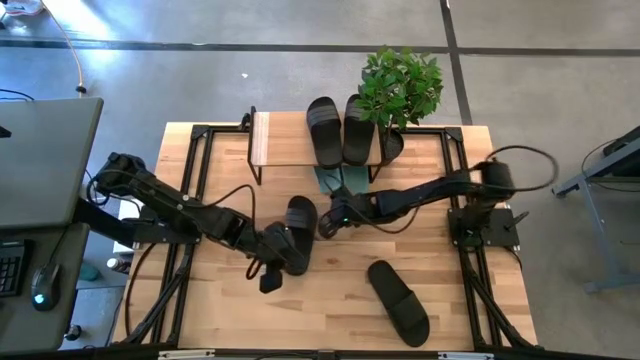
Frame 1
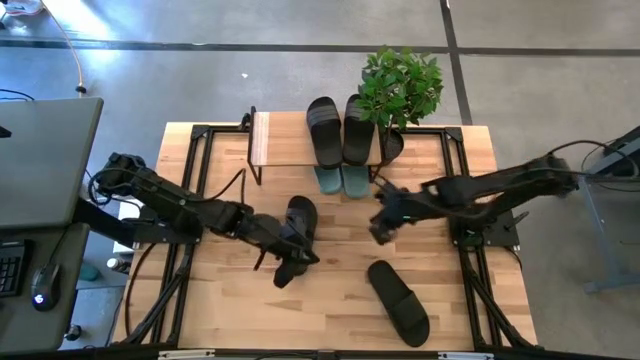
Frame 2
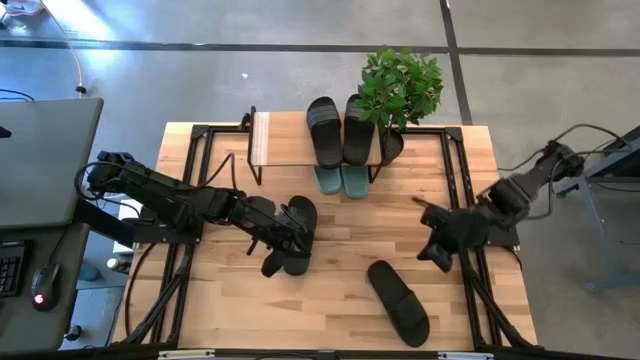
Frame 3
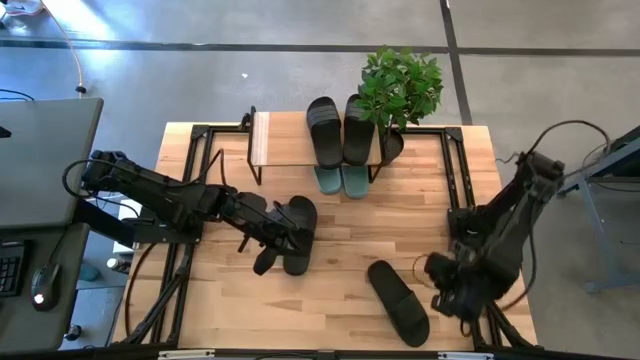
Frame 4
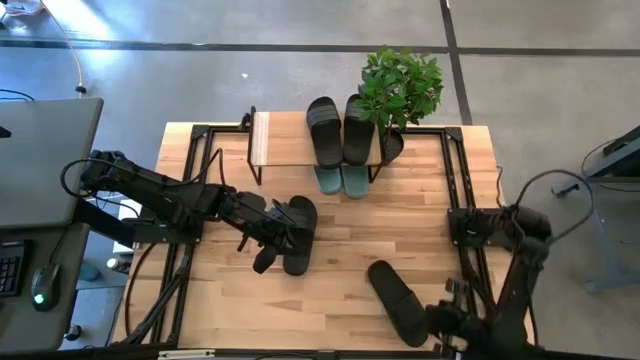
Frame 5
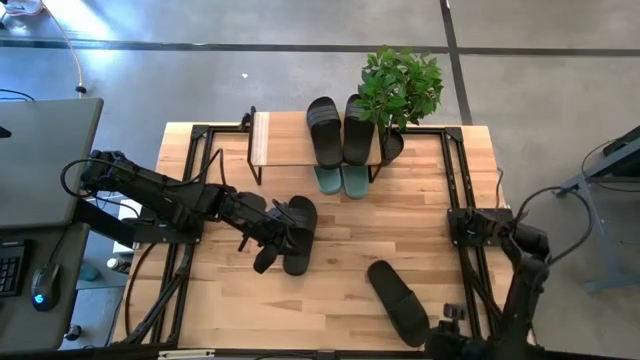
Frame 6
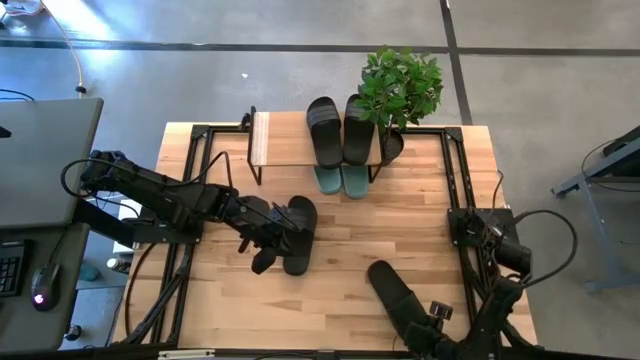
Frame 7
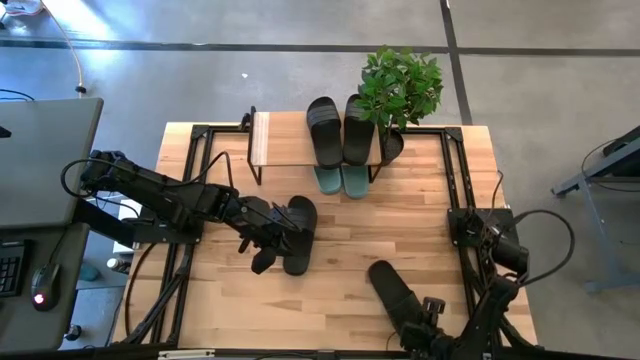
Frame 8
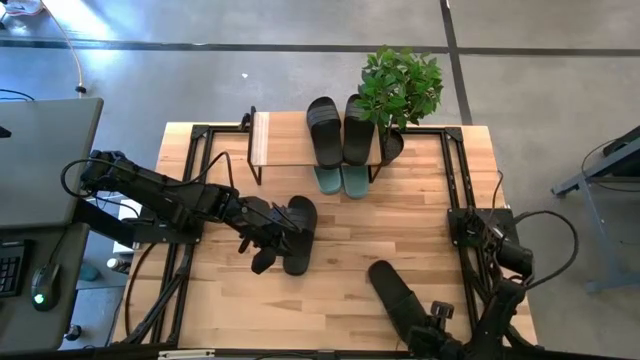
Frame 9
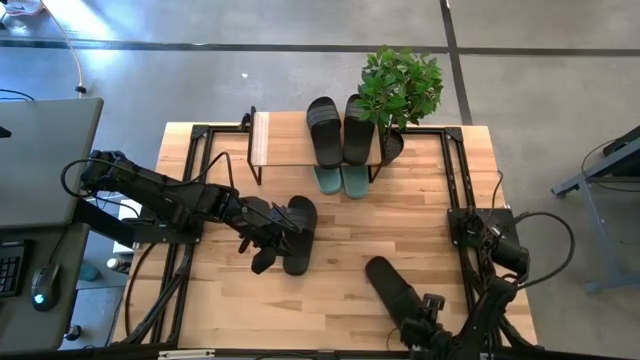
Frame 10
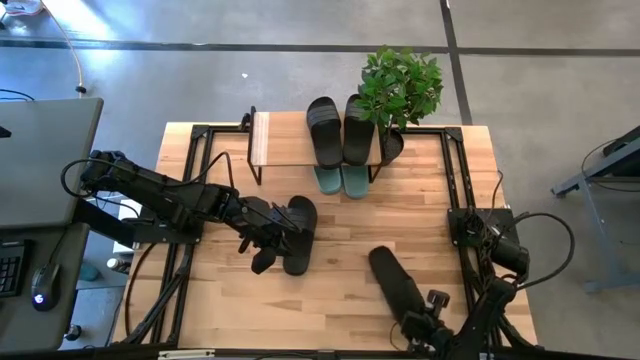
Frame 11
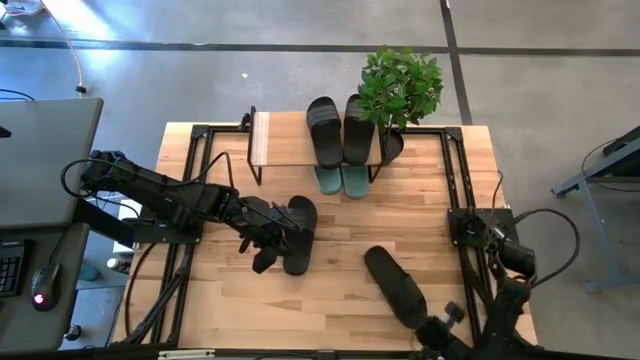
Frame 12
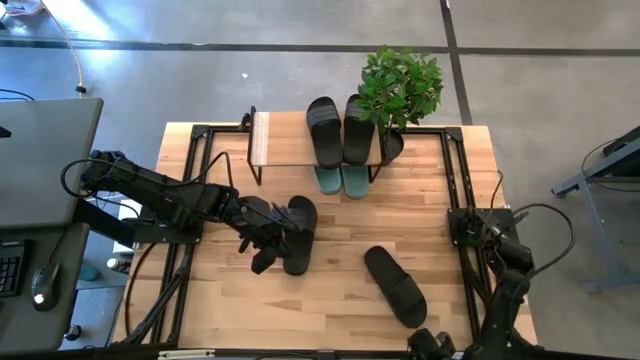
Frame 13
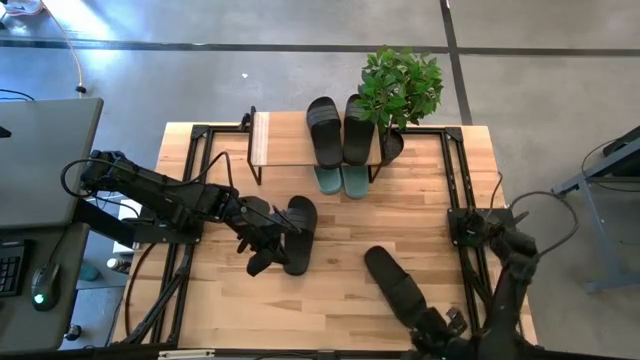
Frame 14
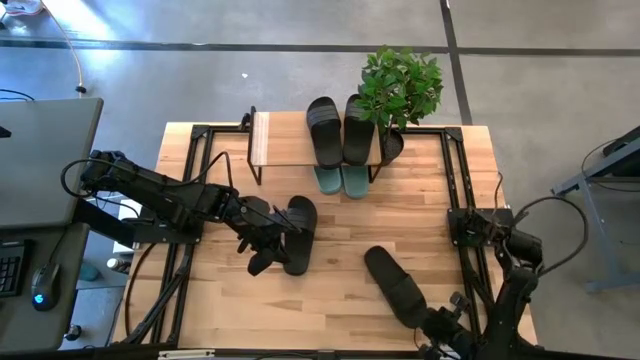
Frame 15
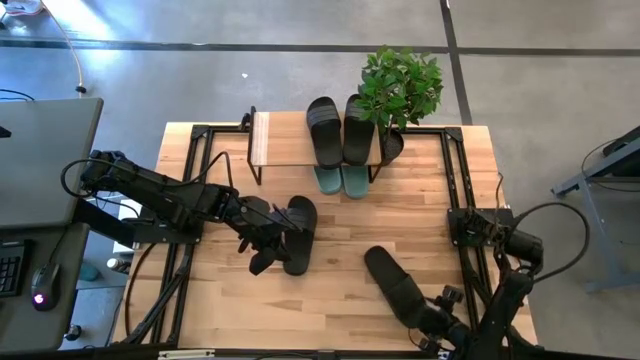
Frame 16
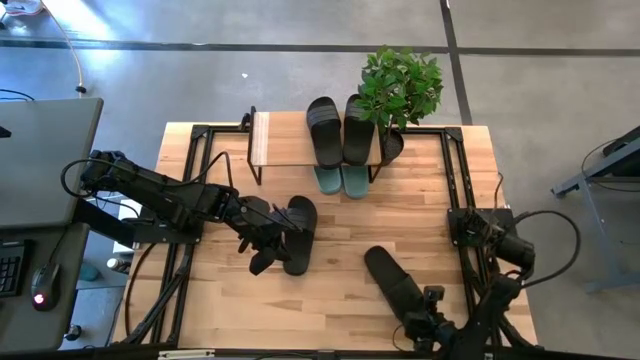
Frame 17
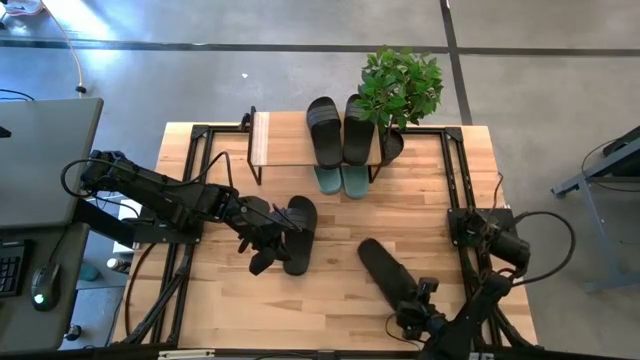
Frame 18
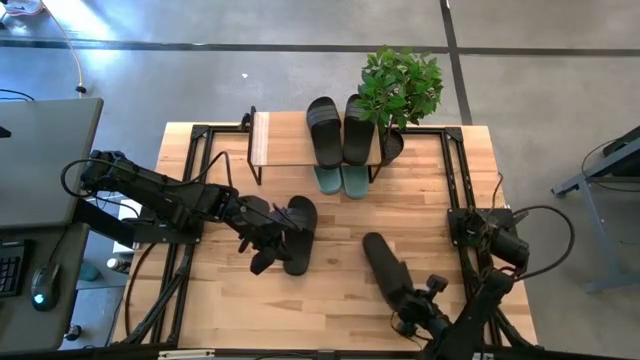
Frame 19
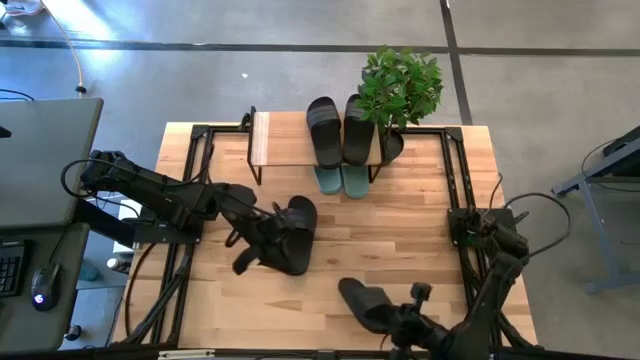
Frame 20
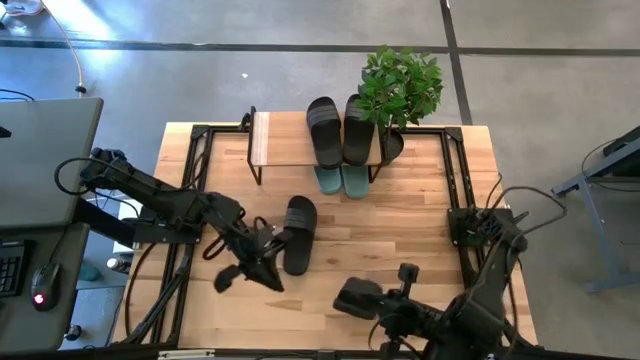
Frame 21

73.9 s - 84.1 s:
Task: Pick and place slides into the shelf
Put the black slipper under the shelf

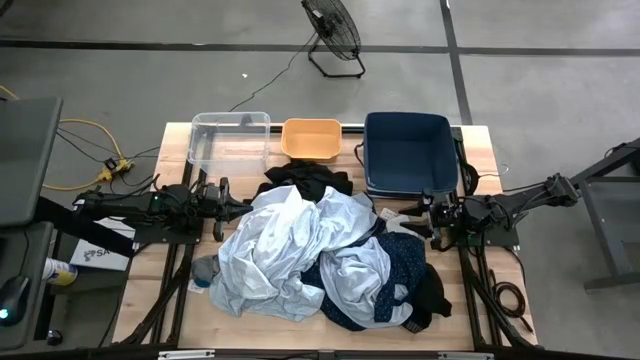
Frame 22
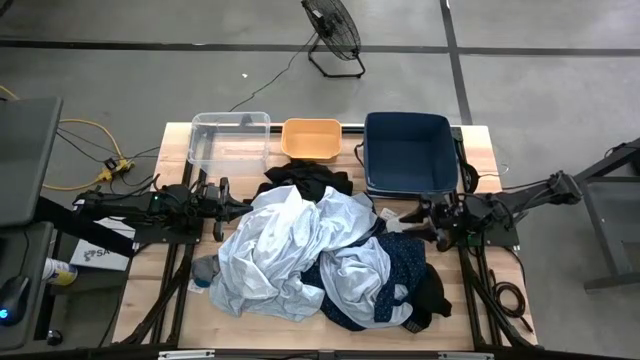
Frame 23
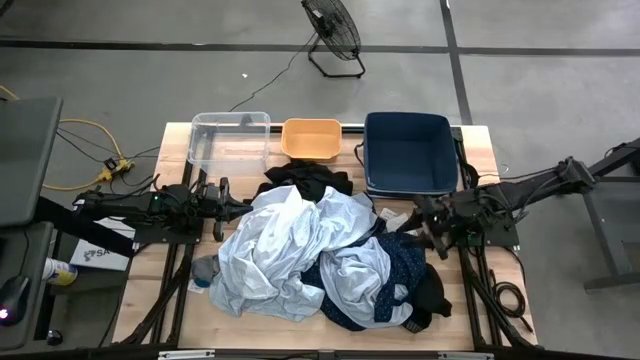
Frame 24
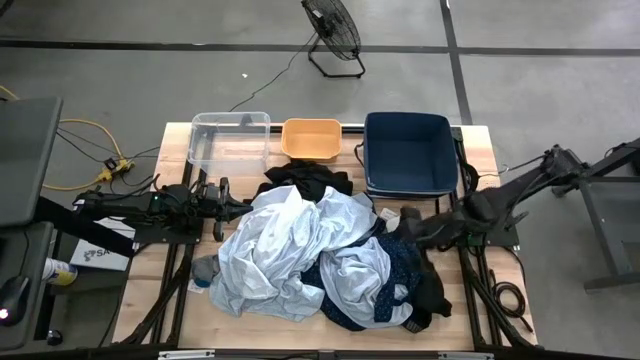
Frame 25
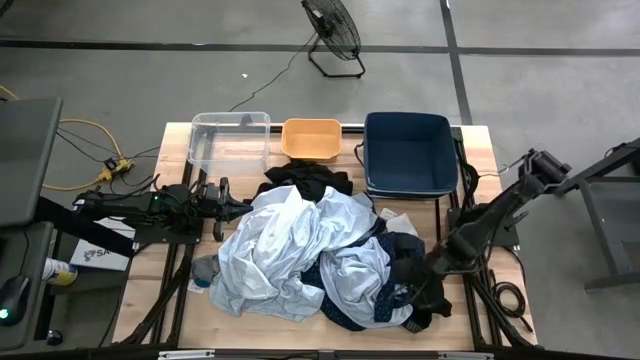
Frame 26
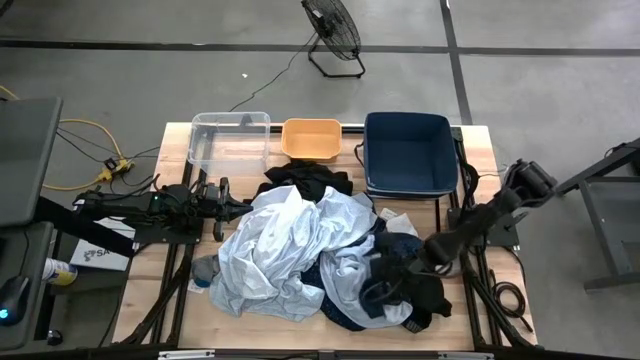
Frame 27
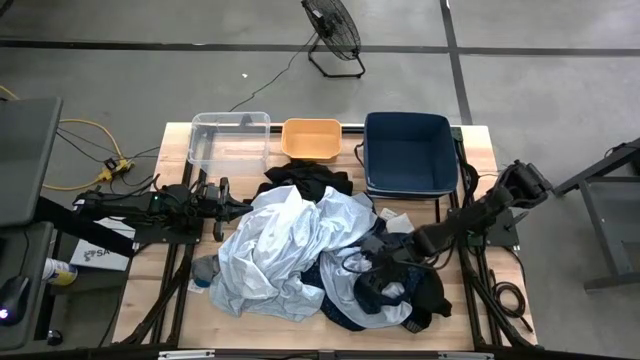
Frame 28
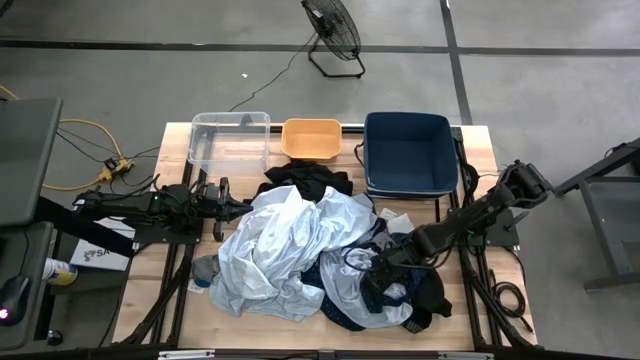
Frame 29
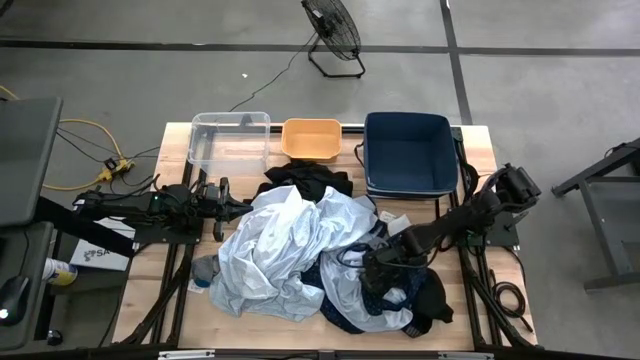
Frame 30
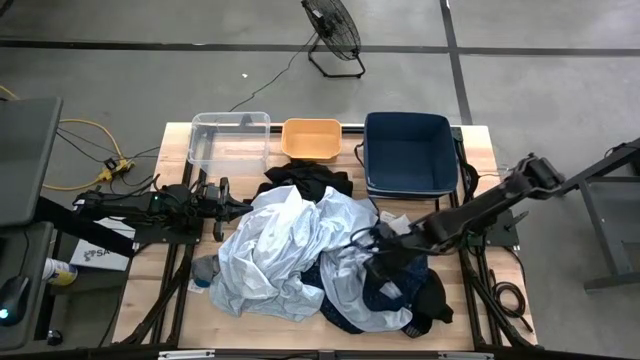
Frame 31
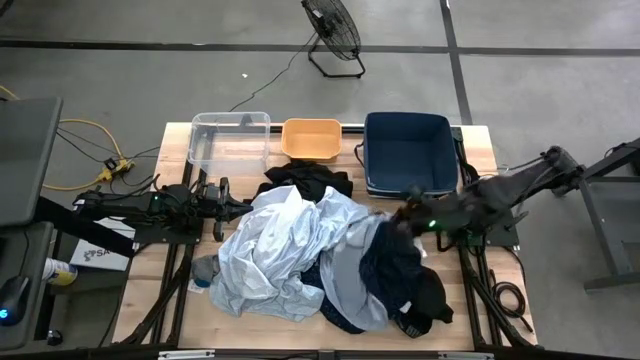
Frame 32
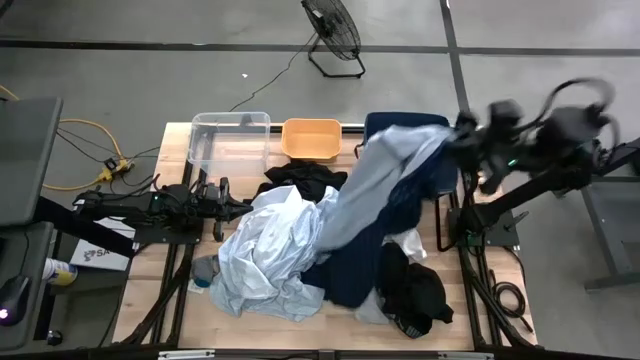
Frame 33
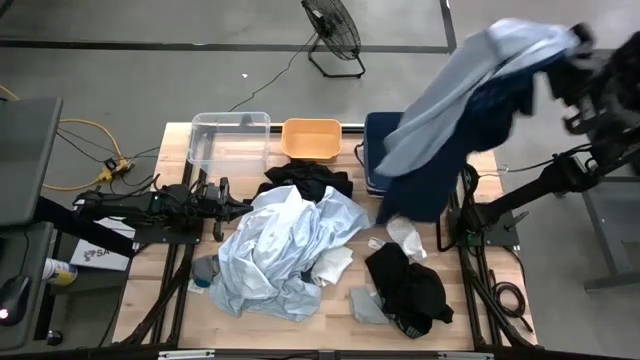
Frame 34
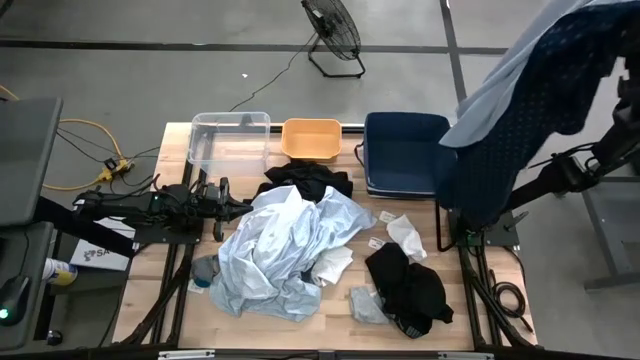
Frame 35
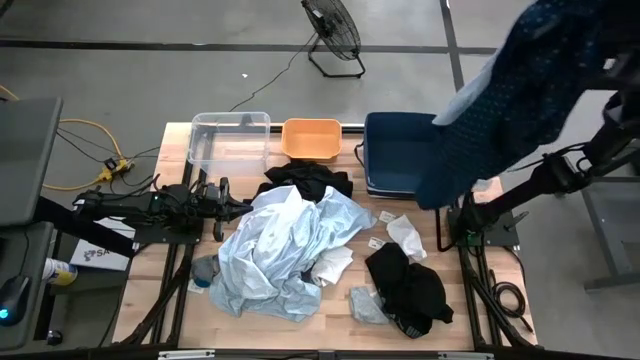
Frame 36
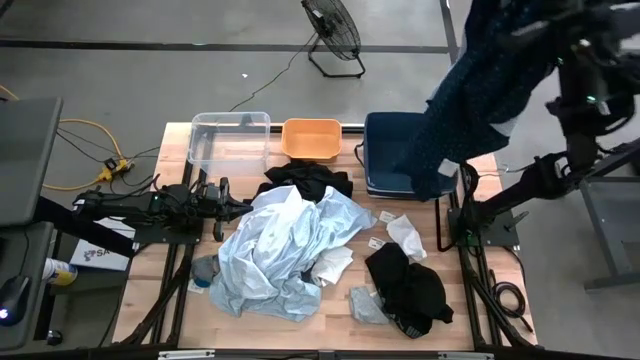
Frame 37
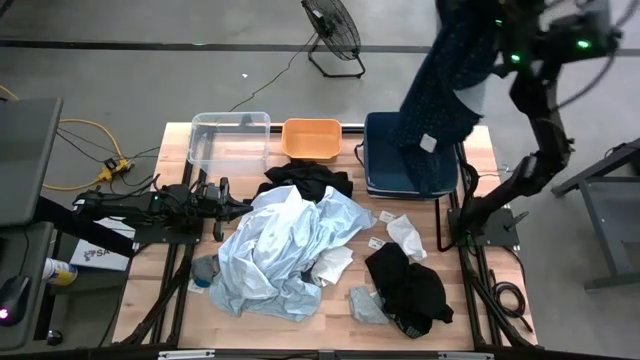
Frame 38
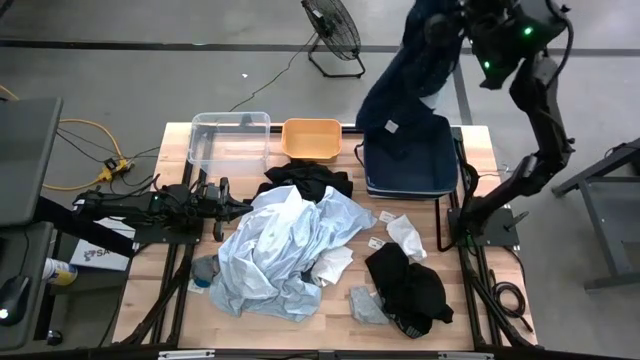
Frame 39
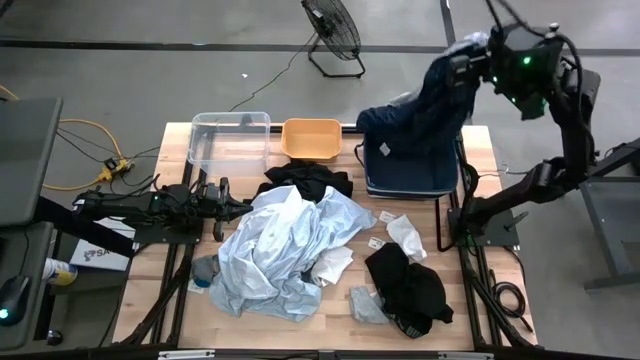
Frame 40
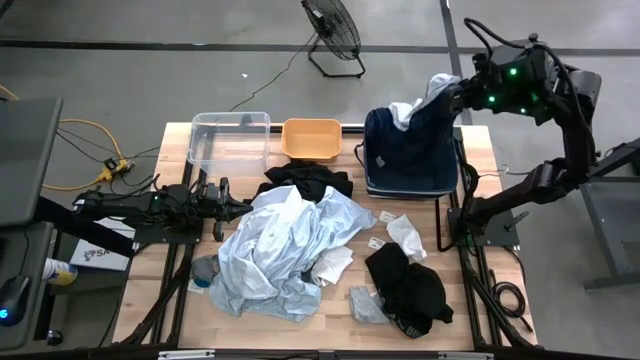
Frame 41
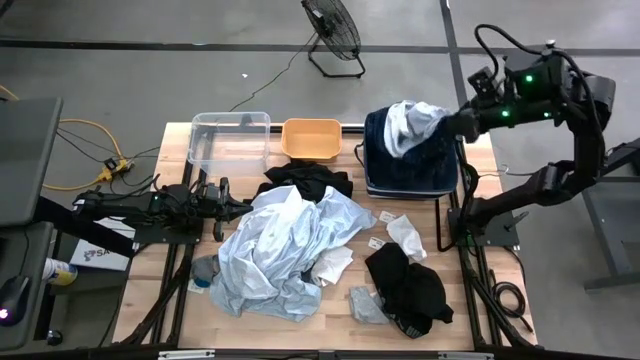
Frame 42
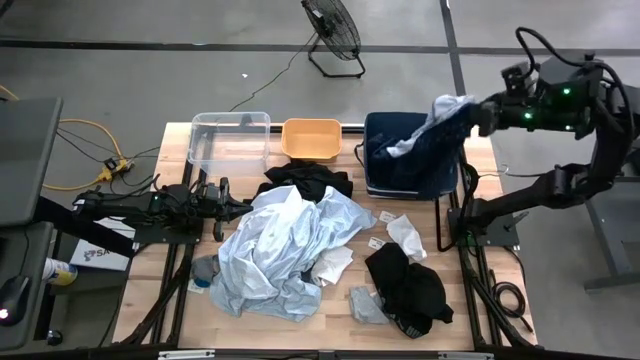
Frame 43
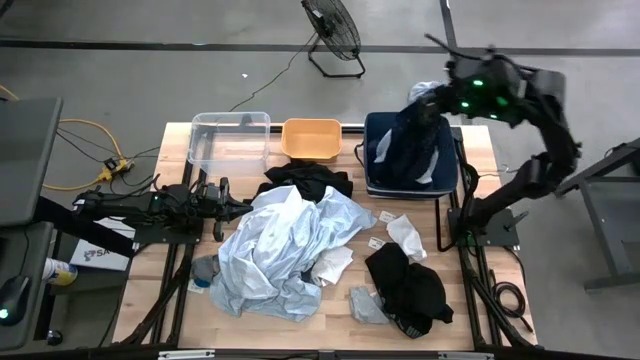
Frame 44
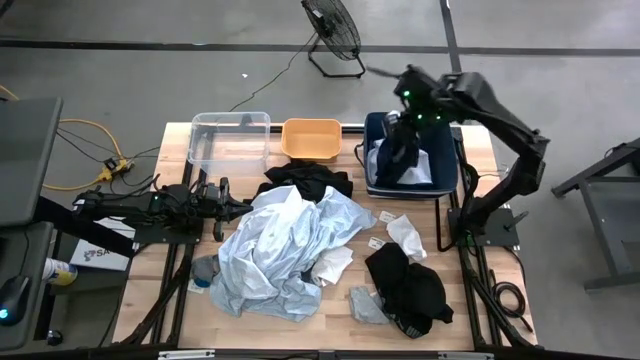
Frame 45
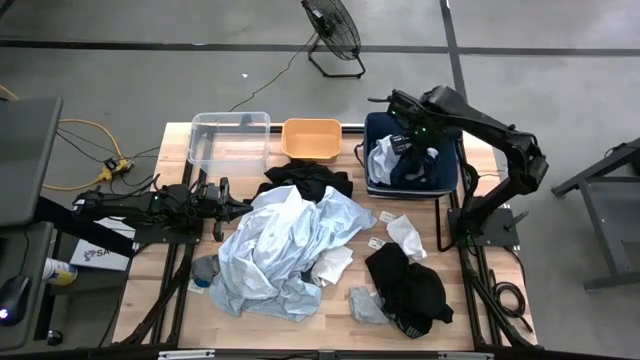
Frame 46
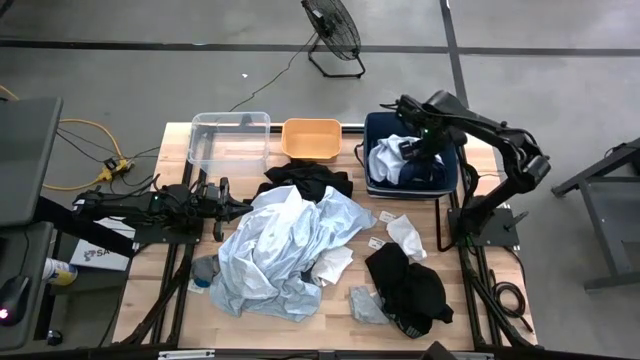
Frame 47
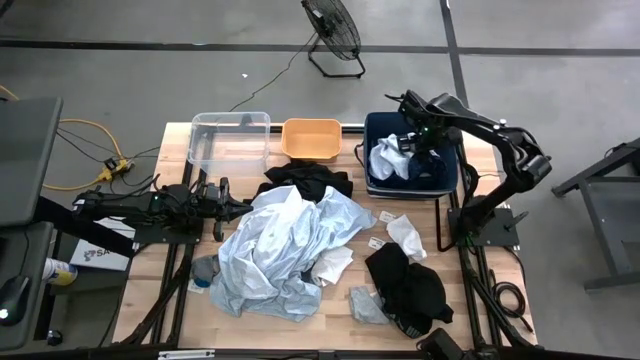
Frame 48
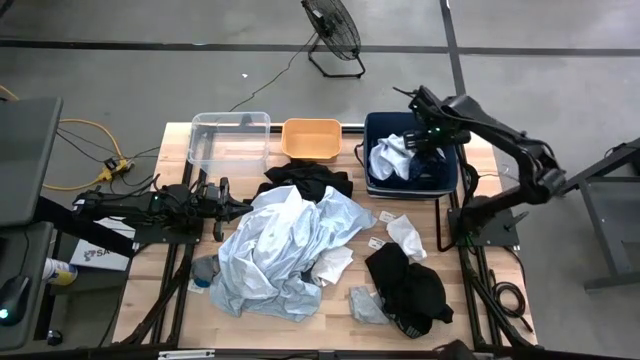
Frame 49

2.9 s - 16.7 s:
Task: Pick & Place Cloths
Put the blue dress into the blue bin
